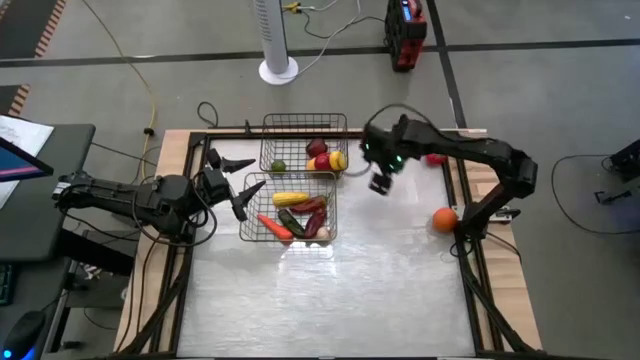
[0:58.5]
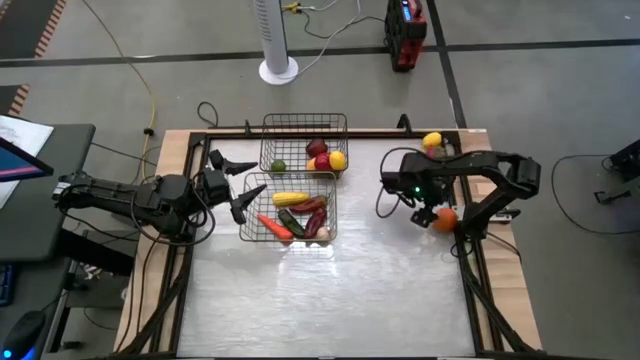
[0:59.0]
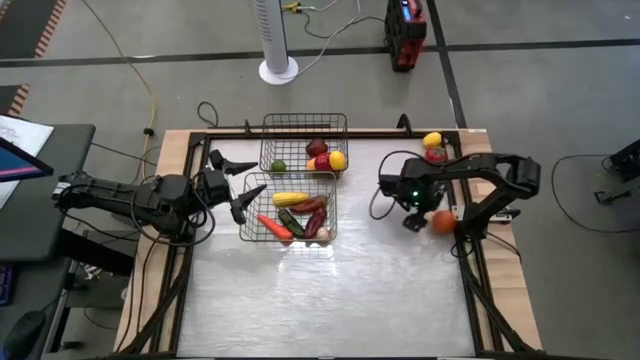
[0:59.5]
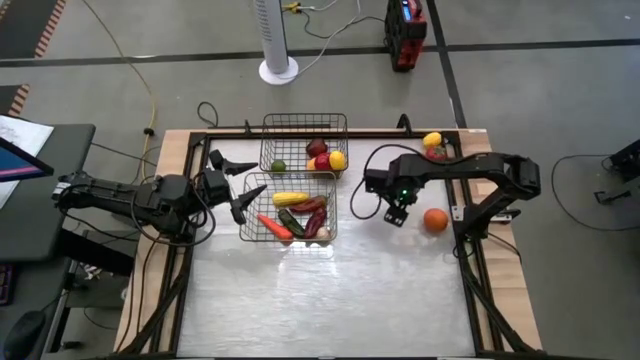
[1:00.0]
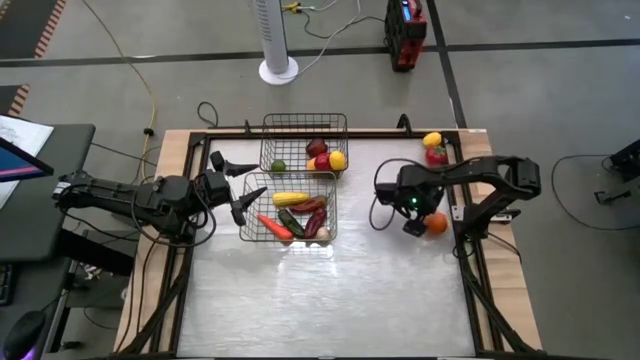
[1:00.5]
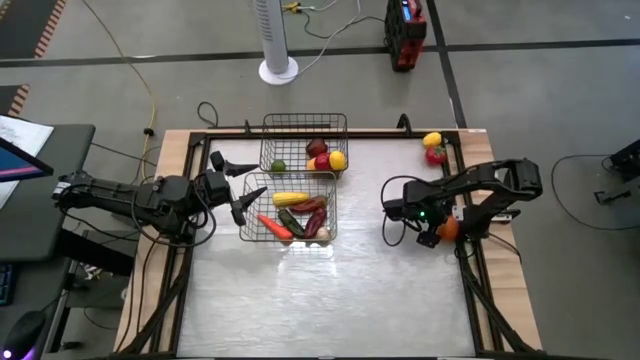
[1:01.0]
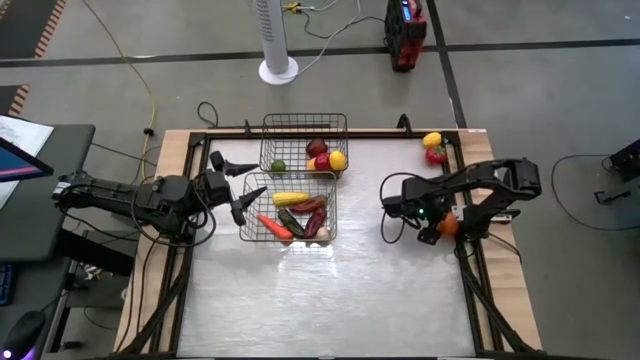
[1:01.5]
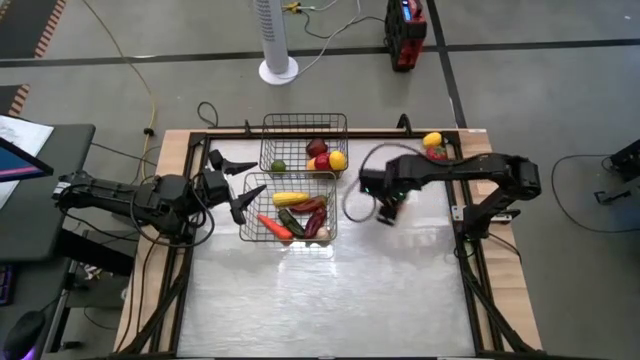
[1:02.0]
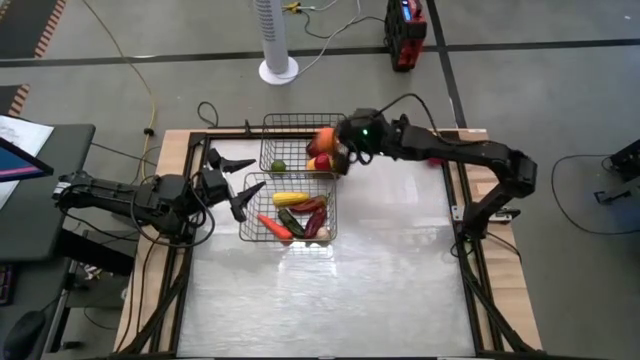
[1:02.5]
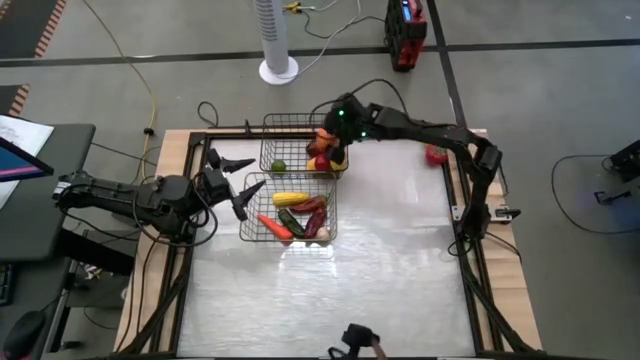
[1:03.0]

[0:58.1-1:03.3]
Task: Sort produce into baskets
Put the orange into the top wire basket

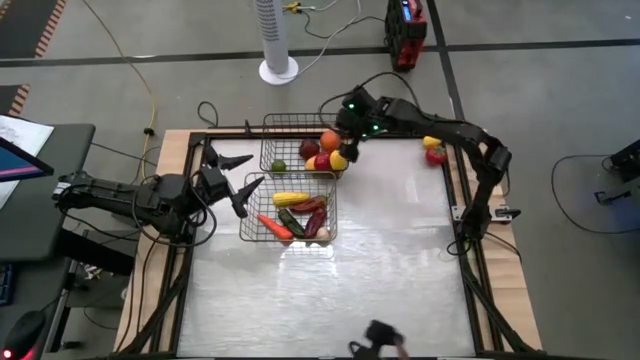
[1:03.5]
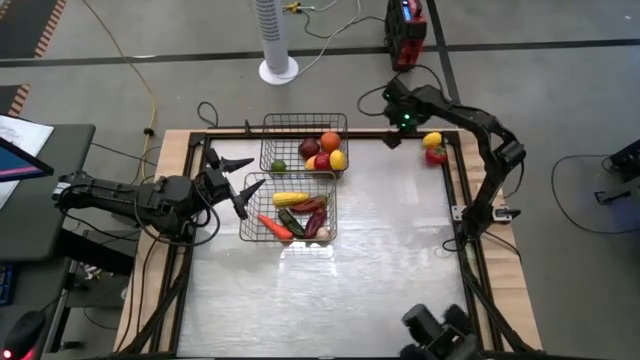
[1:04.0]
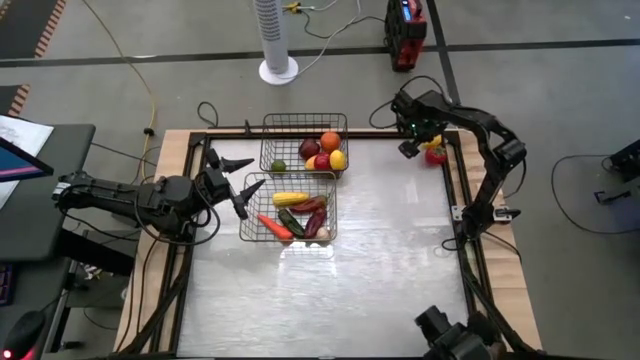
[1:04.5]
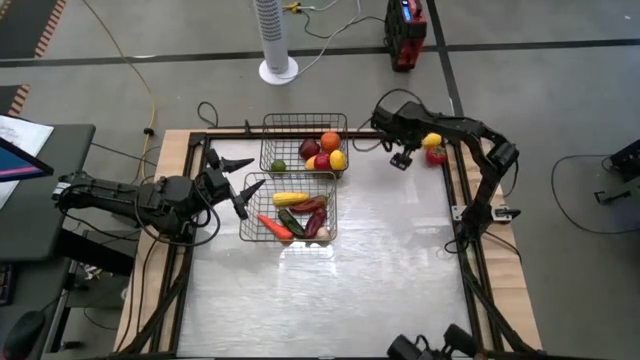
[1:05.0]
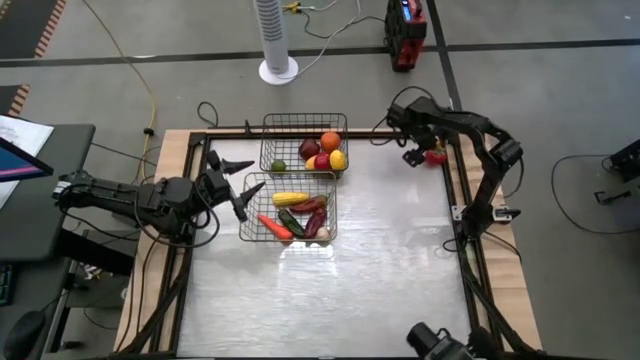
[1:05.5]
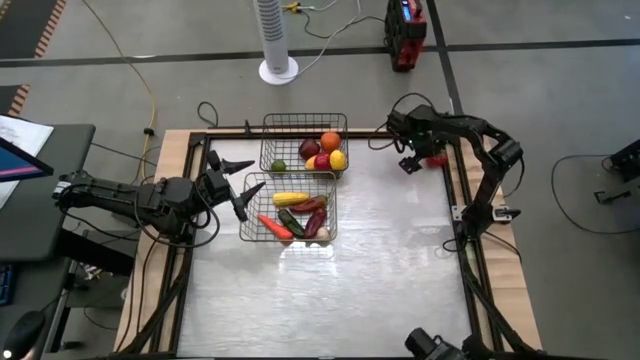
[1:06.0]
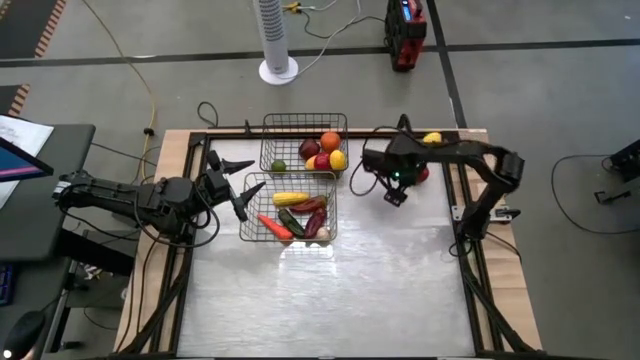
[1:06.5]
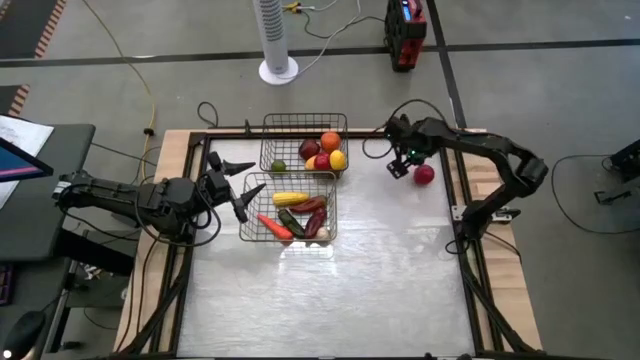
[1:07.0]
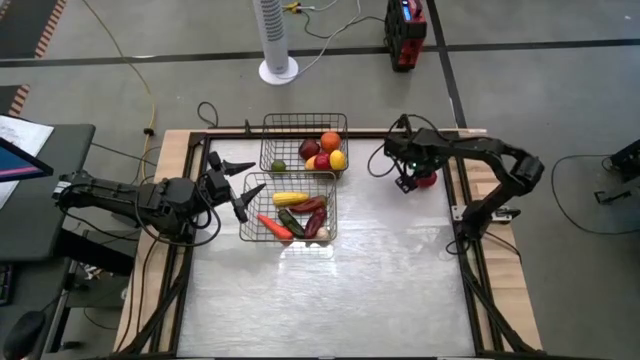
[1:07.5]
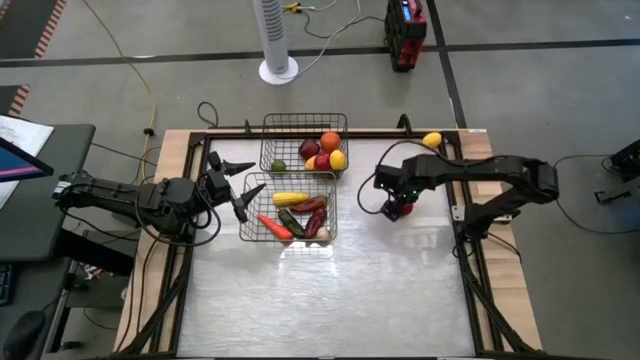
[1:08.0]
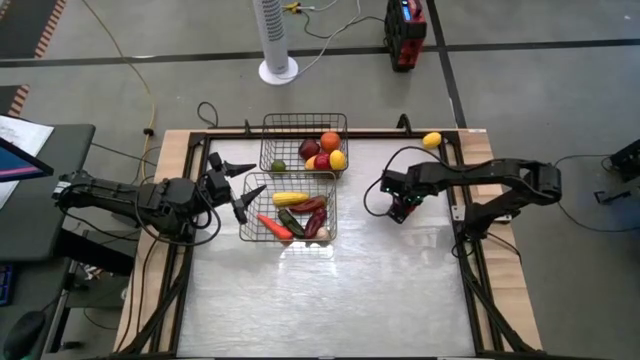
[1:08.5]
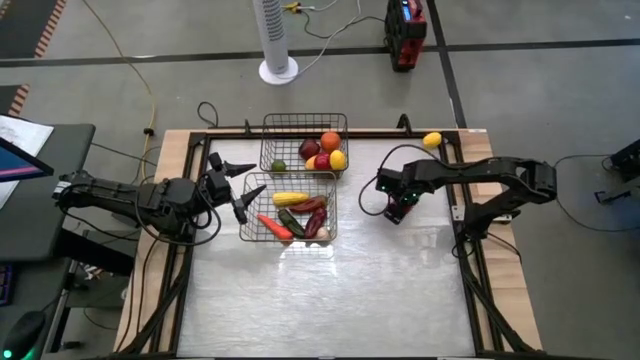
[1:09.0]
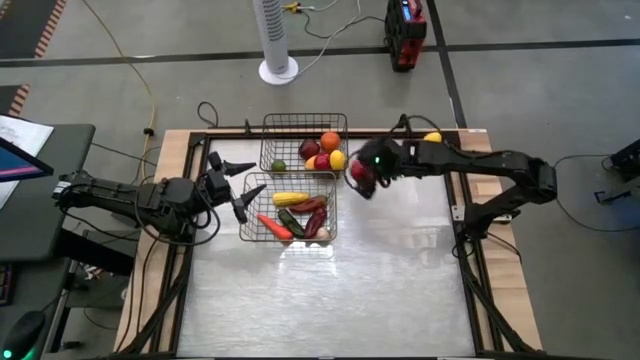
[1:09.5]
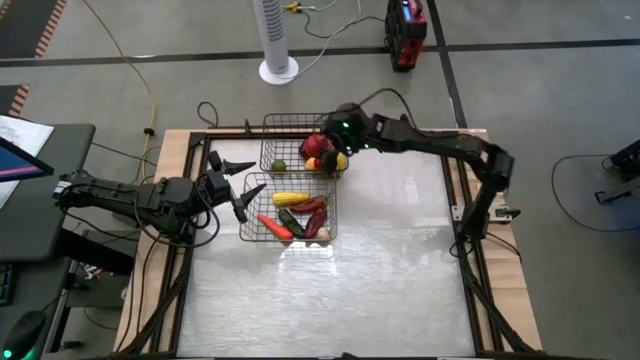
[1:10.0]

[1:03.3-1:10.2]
Put the tomato into the top wire basket

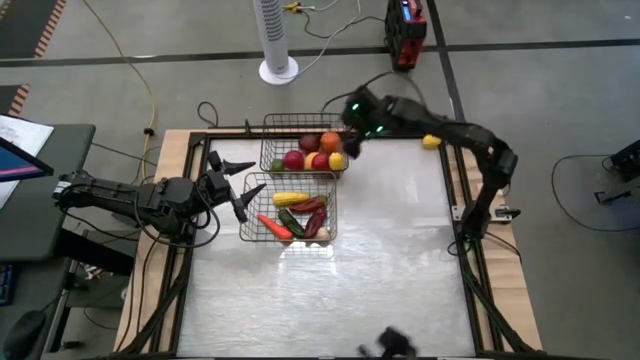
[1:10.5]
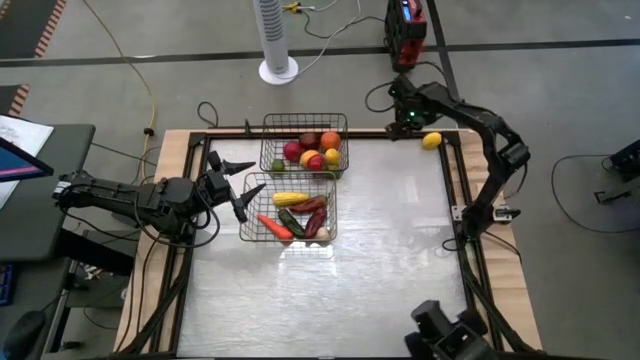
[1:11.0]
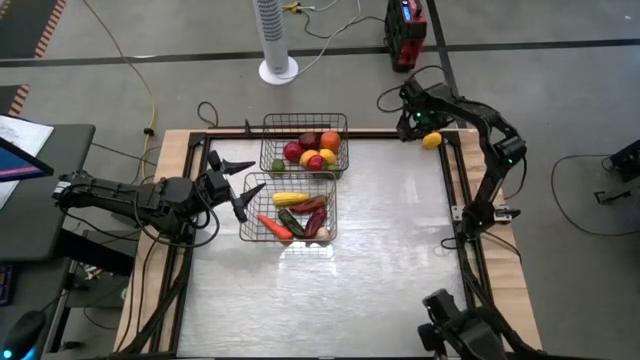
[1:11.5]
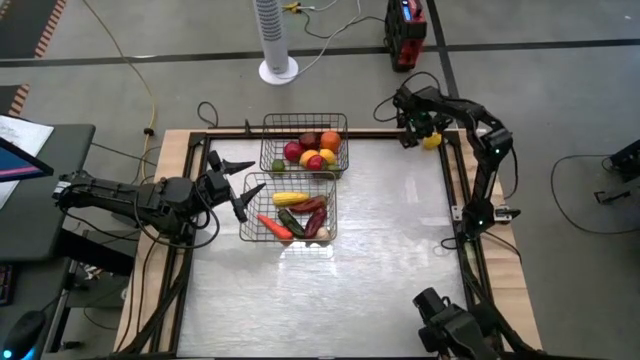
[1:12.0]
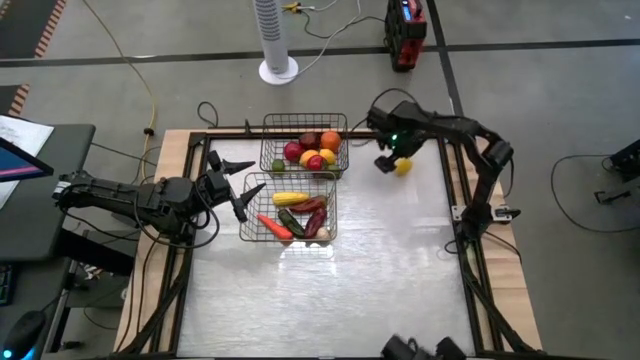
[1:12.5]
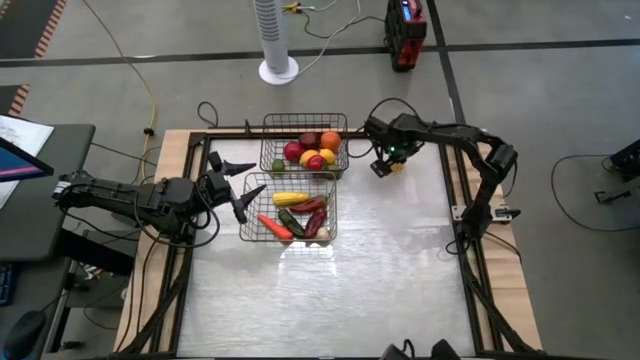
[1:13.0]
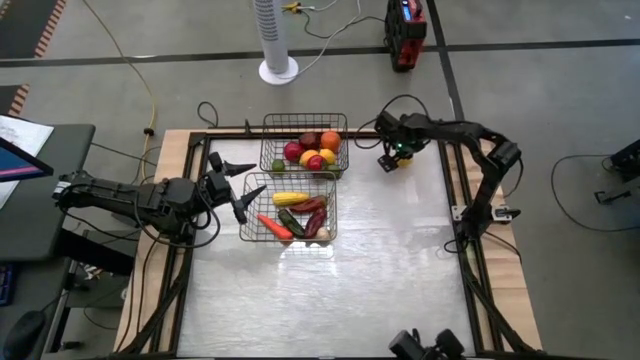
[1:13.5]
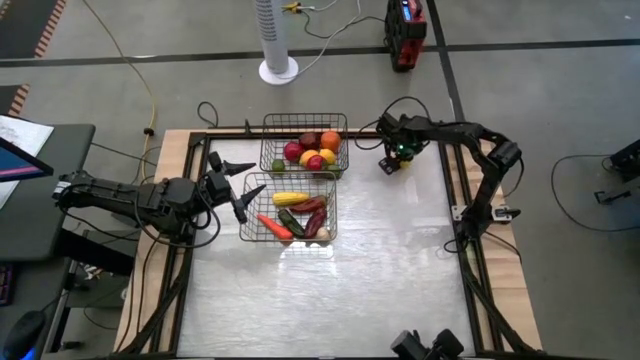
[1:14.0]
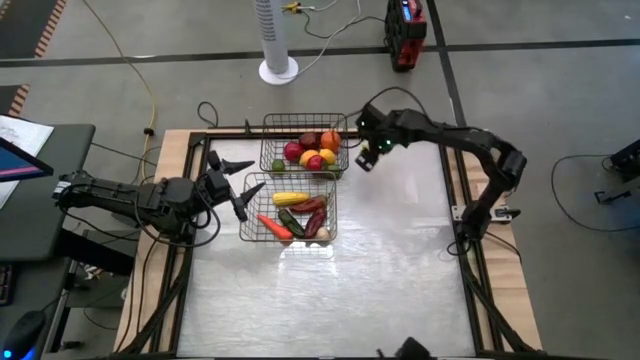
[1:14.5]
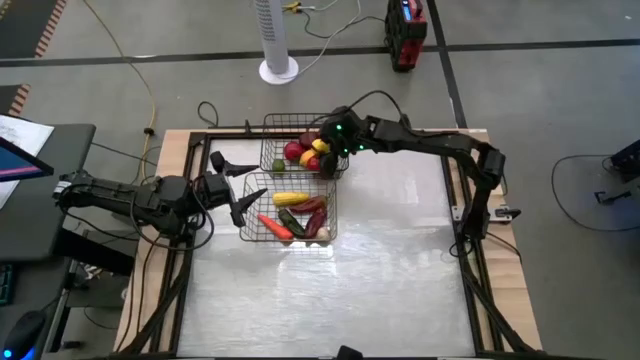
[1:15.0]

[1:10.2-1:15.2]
Put the lemon into the top wire basket

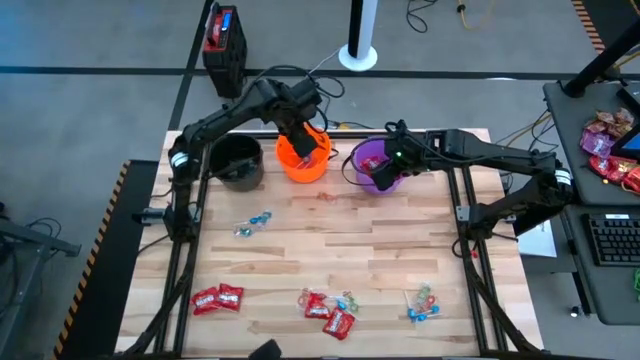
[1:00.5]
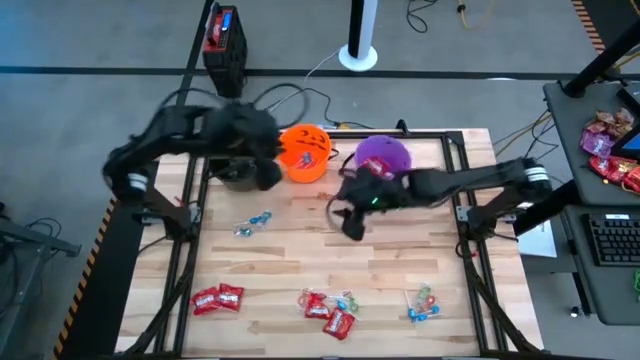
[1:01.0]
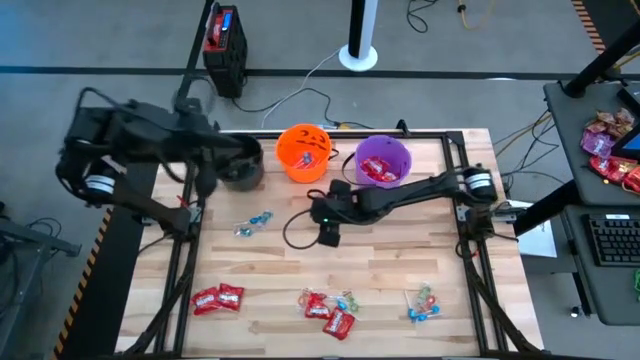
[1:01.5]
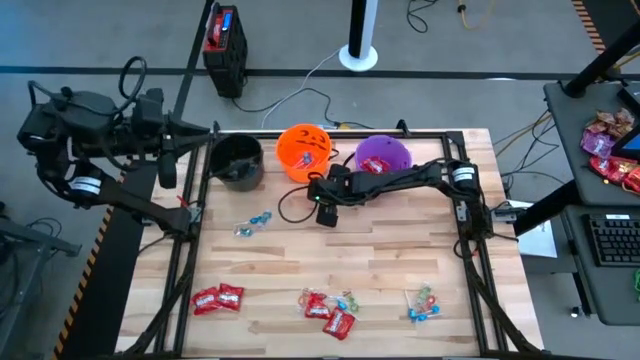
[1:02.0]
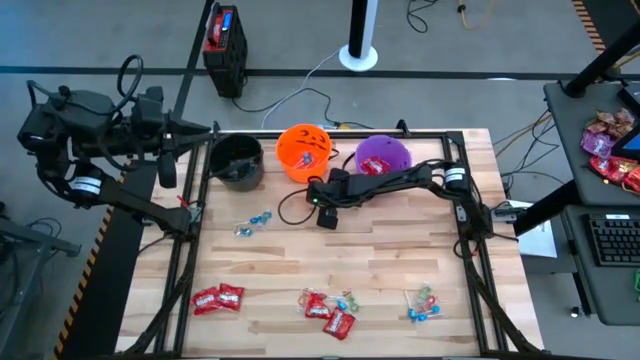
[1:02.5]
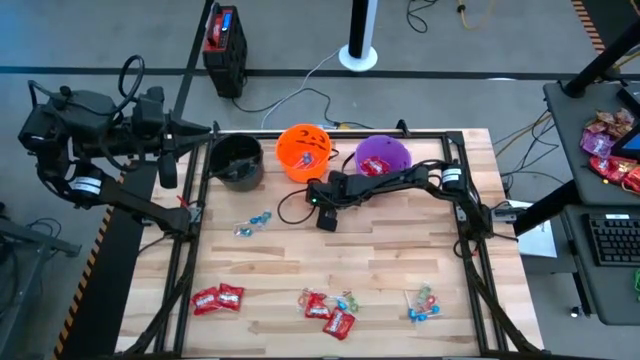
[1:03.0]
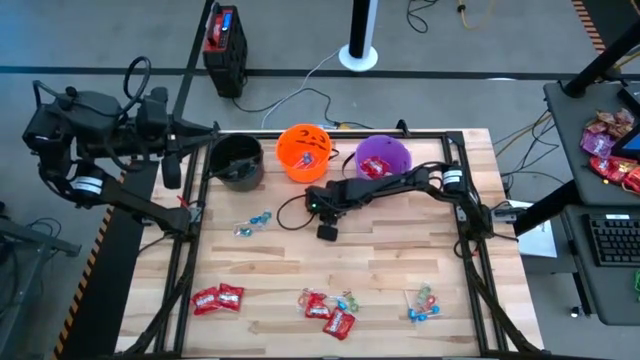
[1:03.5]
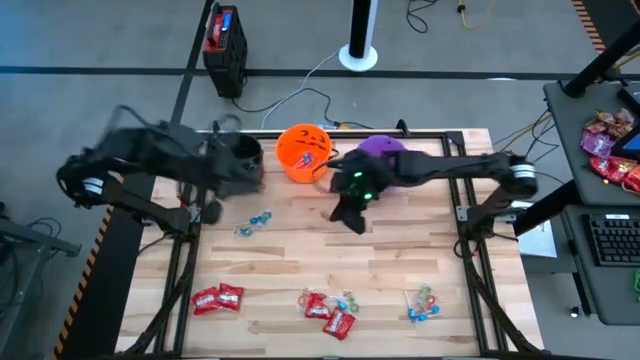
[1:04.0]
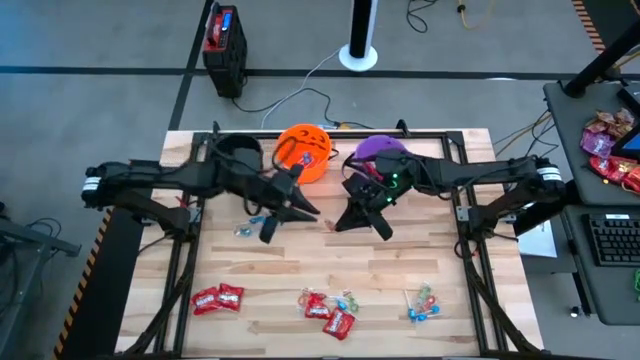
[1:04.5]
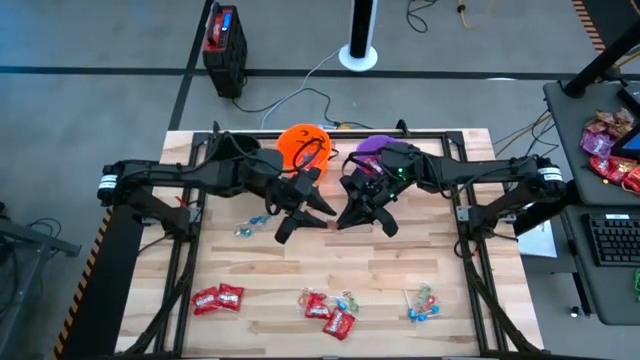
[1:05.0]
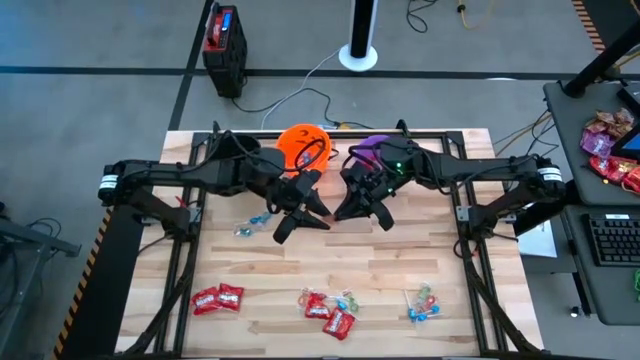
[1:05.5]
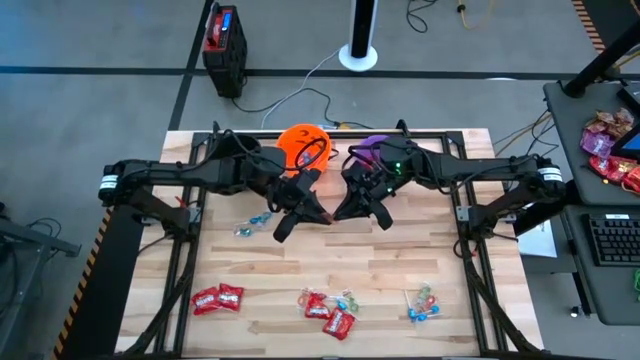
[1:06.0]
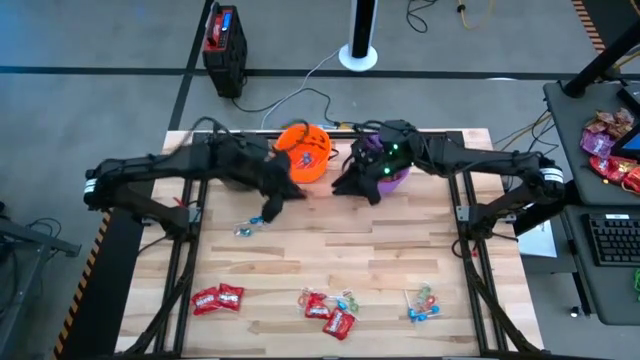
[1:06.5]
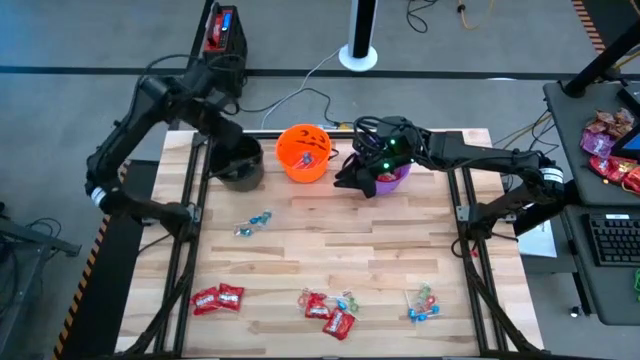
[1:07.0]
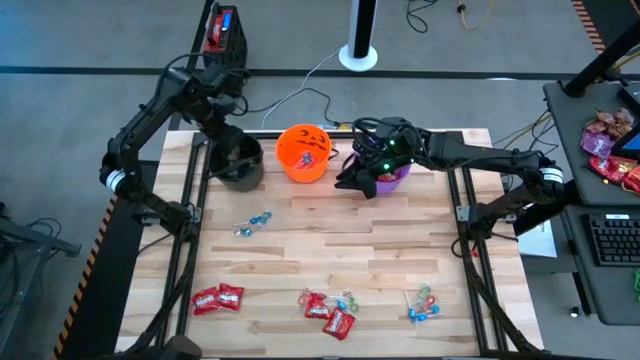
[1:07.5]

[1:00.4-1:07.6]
Task: Sort candy by brand, put in halloween buckets
Put the orange gummy into the black bucket
